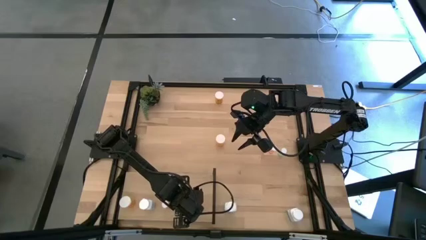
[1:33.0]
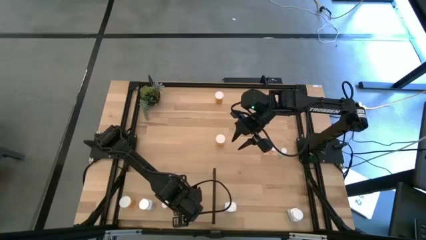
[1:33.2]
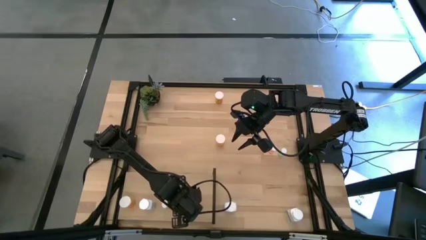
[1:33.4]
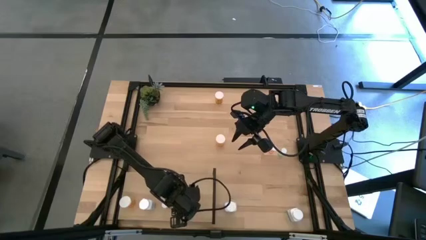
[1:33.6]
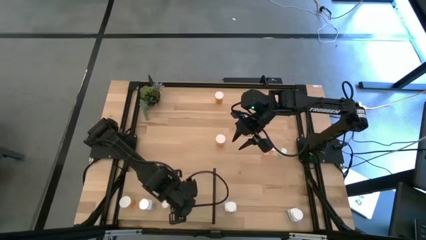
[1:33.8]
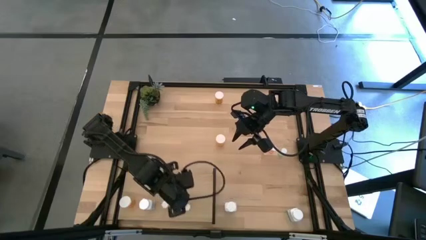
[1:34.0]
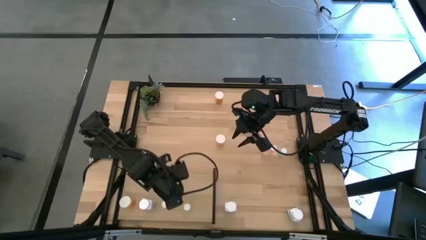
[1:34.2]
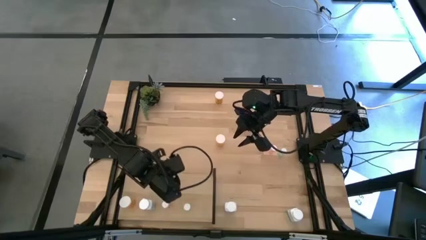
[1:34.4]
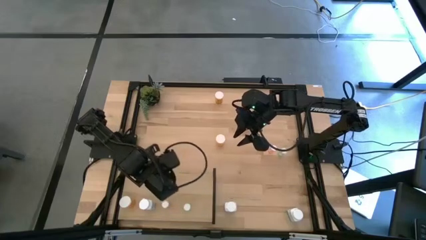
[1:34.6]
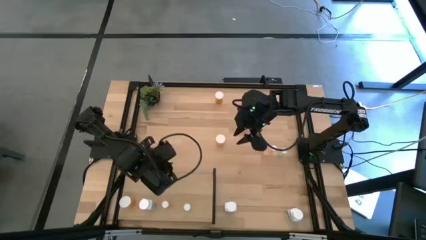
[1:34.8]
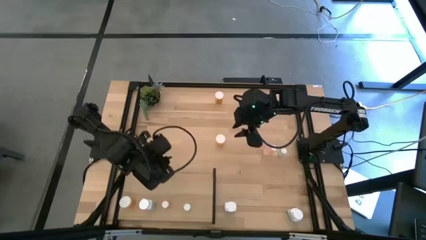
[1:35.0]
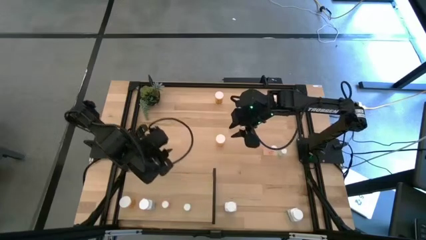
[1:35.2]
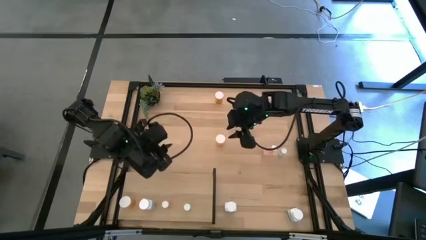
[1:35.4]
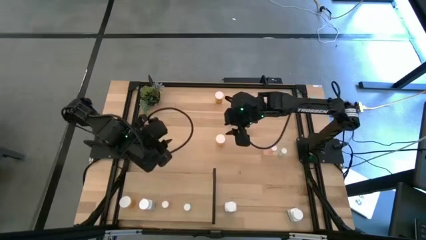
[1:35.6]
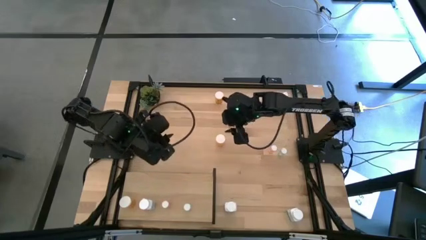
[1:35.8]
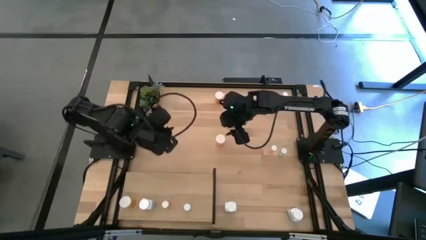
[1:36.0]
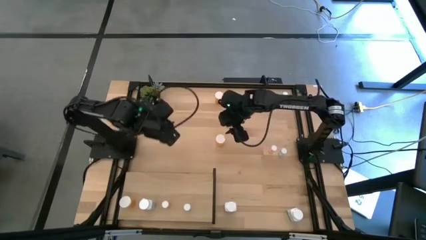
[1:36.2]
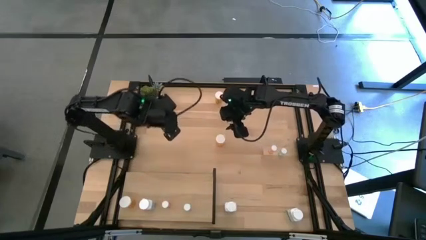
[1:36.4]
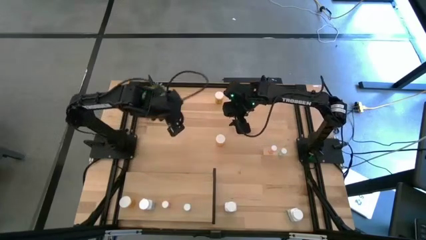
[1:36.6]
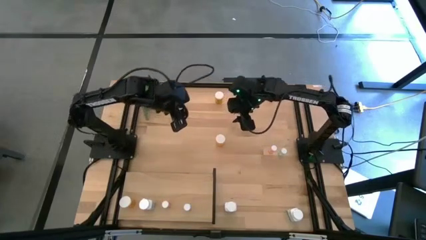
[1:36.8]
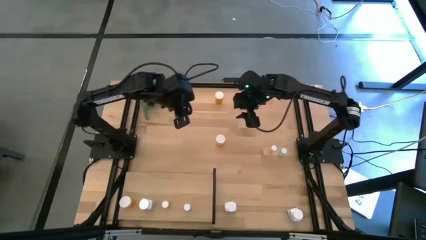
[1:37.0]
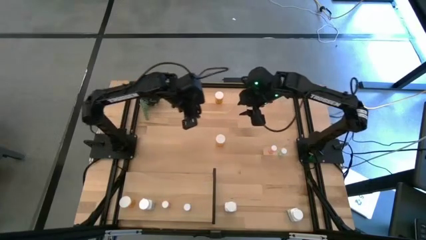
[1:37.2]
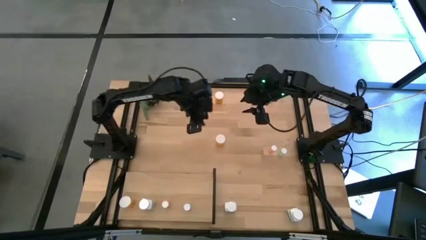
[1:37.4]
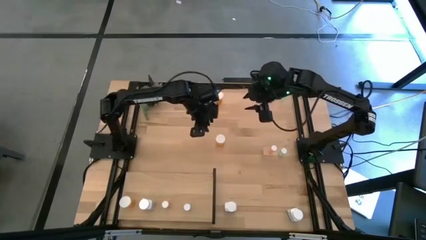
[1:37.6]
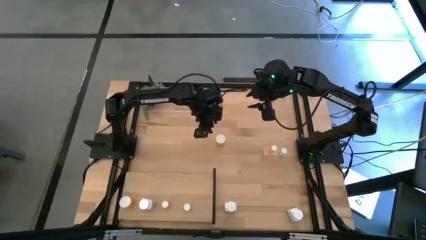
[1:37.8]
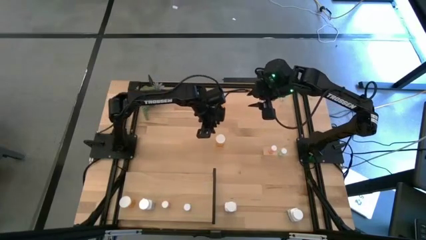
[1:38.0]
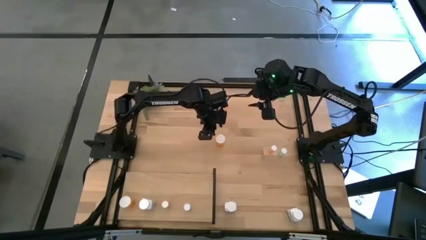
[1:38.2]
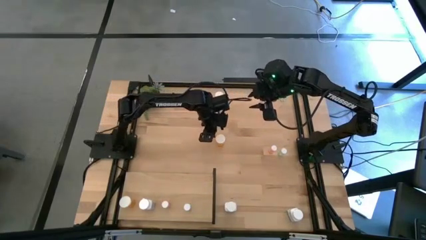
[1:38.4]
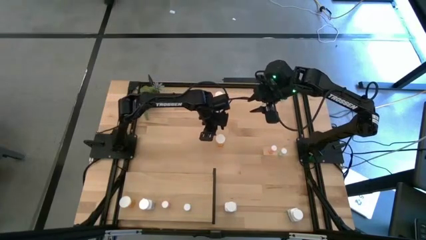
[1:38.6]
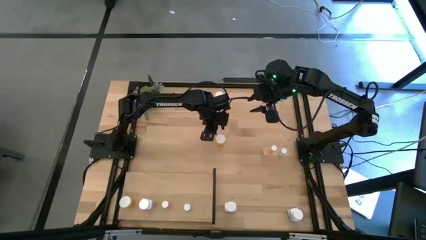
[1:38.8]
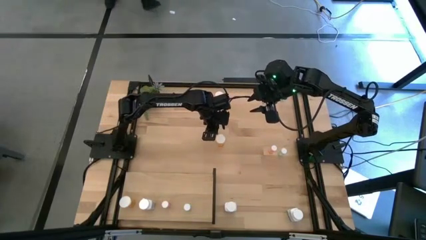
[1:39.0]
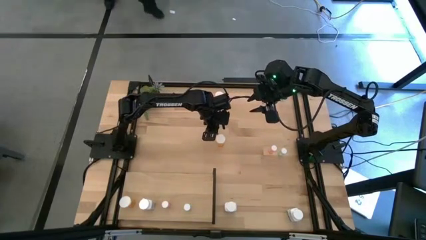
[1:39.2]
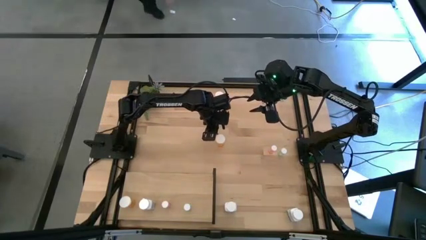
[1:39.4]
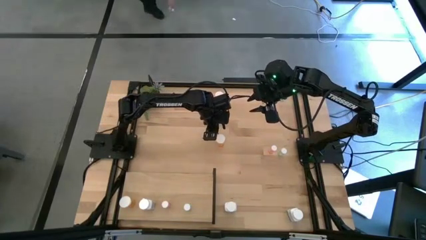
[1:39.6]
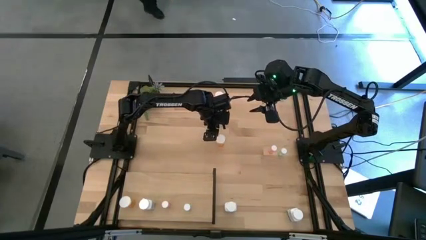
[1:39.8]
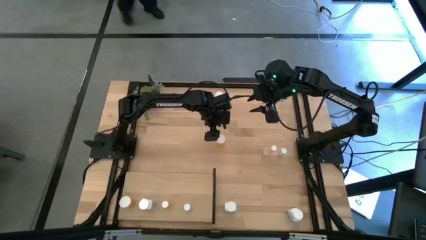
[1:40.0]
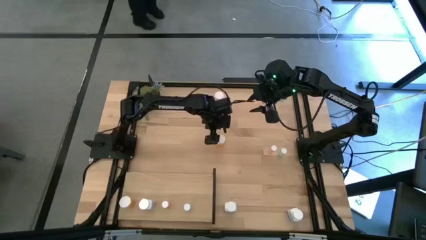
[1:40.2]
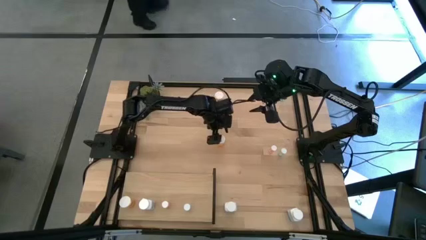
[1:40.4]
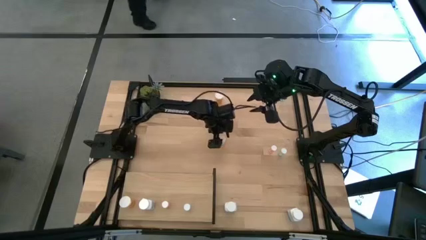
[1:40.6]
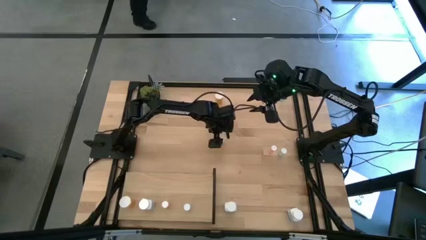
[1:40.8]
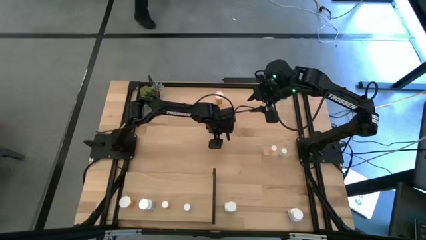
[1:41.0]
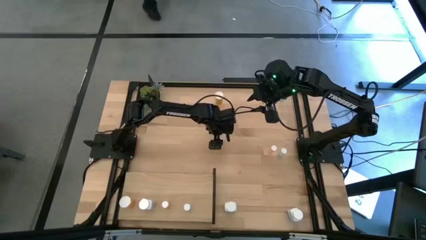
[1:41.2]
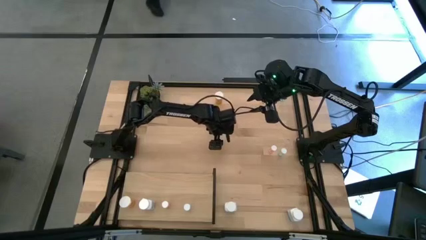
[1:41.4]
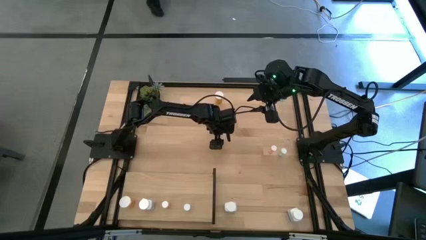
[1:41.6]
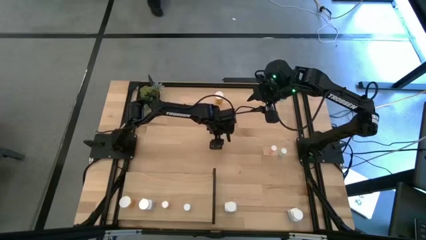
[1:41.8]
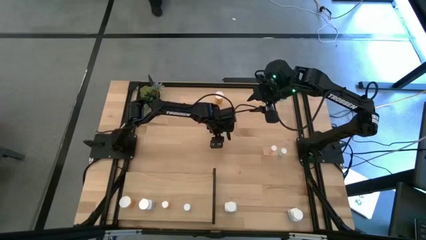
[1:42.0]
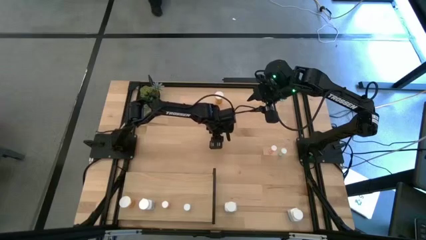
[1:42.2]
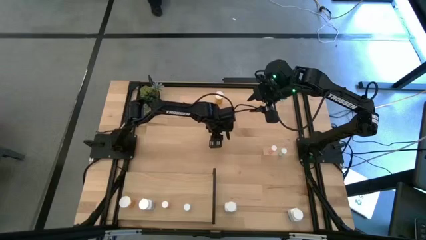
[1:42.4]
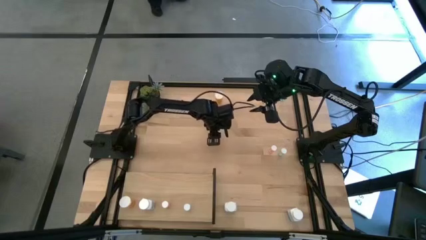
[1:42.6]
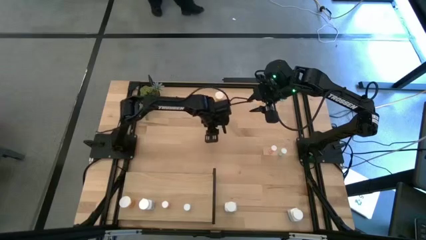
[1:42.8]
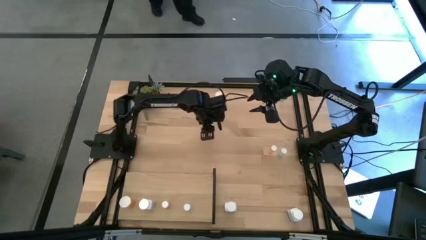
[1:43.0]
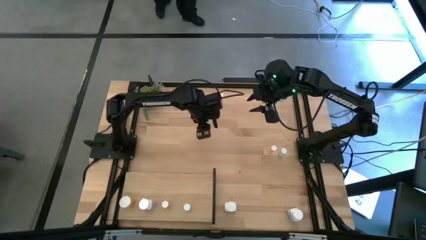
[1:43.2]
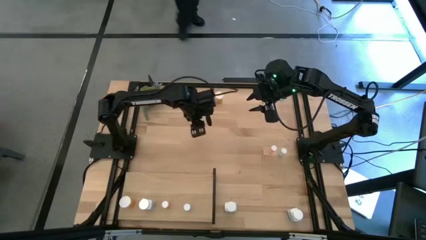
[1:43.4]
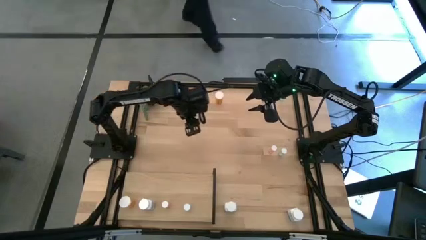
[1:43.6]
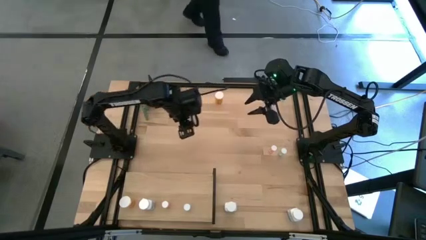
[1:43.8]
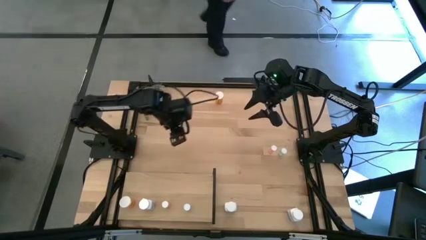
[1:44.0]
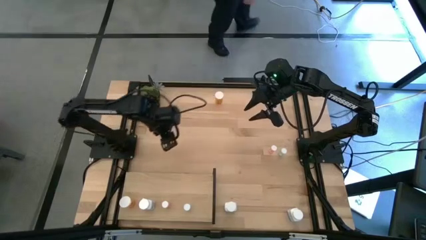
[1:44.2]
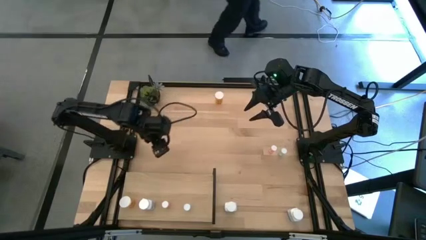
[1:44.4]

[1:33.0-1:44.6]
Task: Pick and place medicine bottles onto shelf by color
Put the bottom big orange pill bottle on the shelf aligned with the other big orange pill bottle
